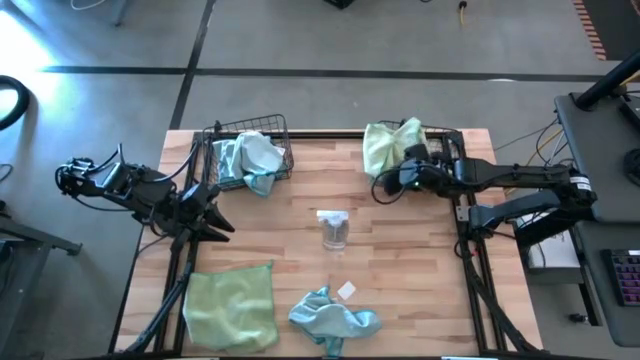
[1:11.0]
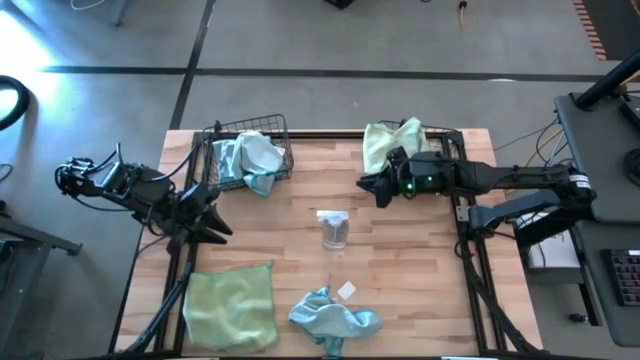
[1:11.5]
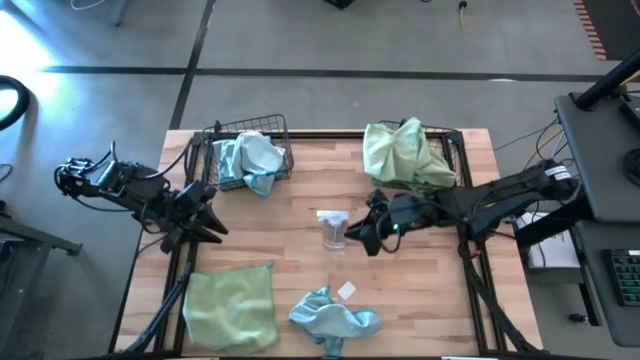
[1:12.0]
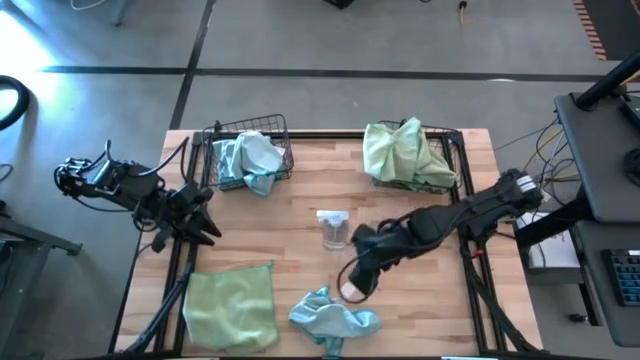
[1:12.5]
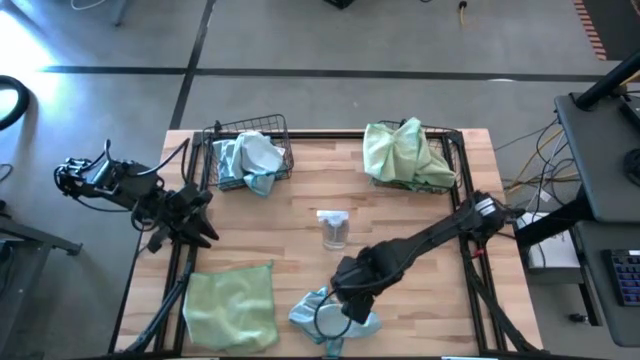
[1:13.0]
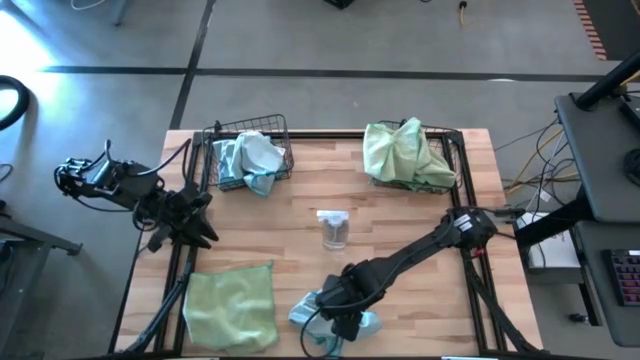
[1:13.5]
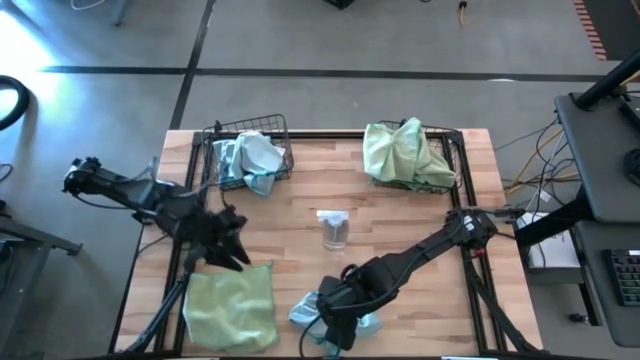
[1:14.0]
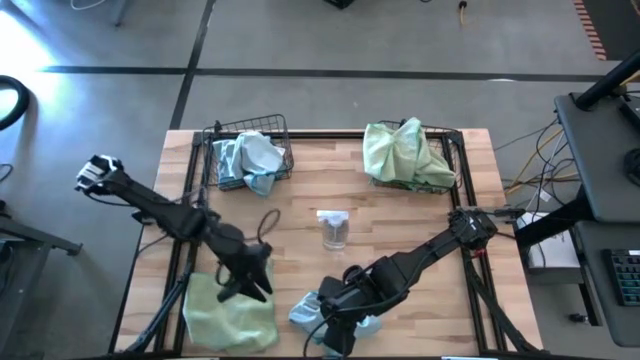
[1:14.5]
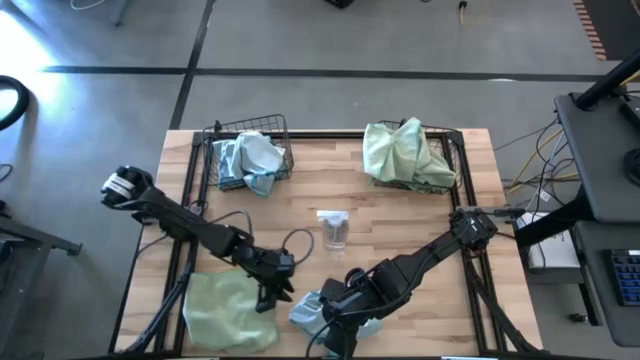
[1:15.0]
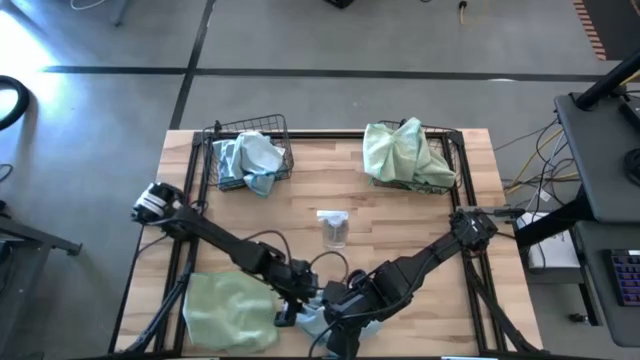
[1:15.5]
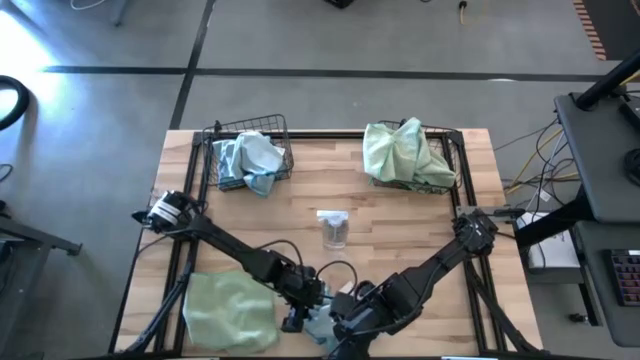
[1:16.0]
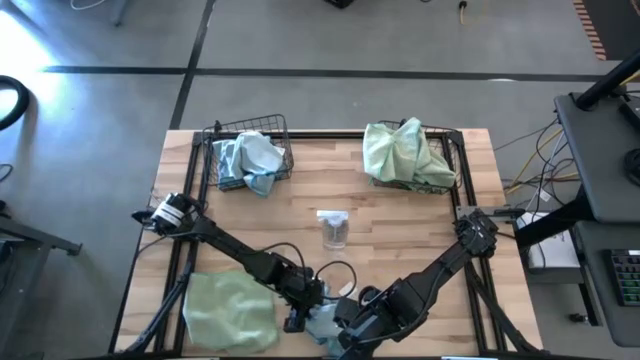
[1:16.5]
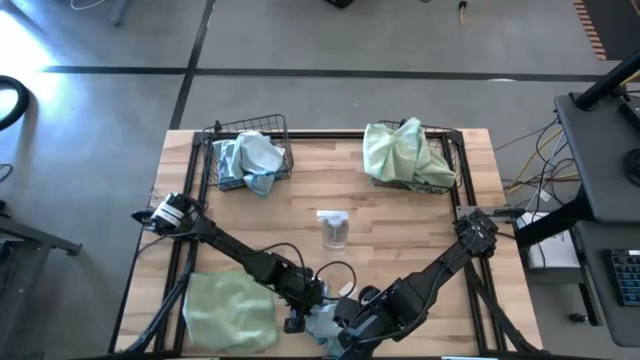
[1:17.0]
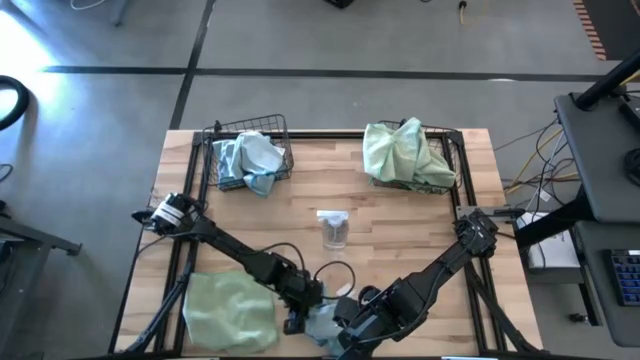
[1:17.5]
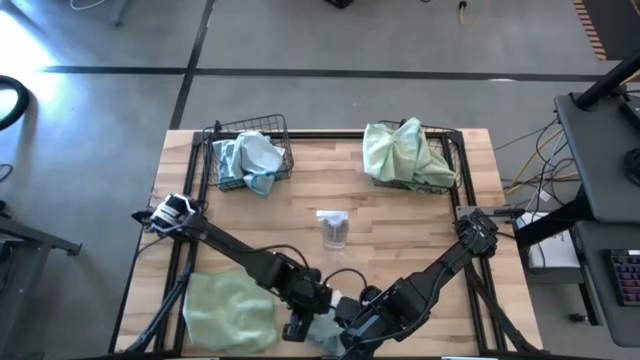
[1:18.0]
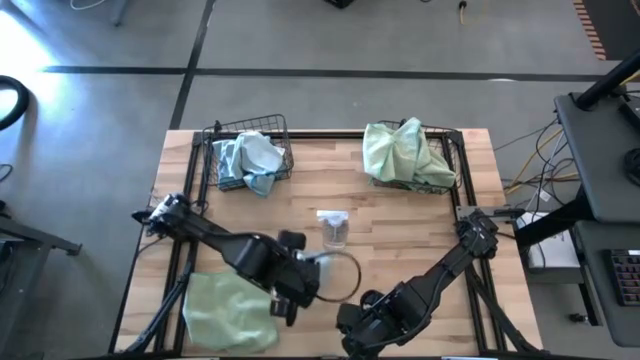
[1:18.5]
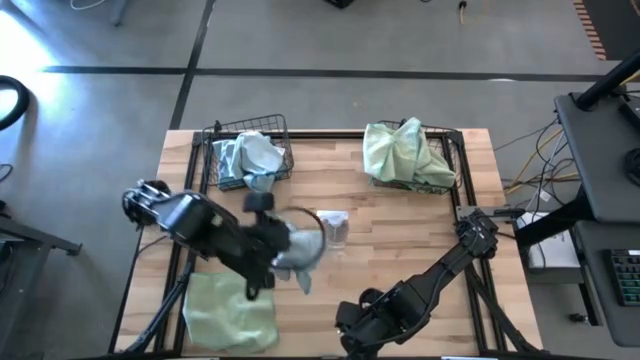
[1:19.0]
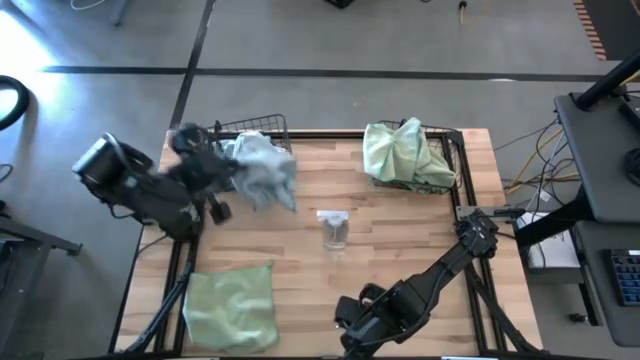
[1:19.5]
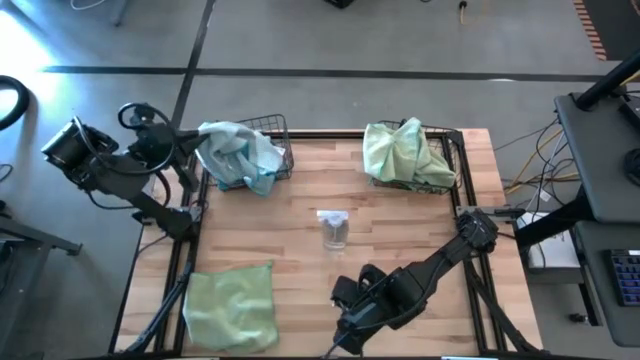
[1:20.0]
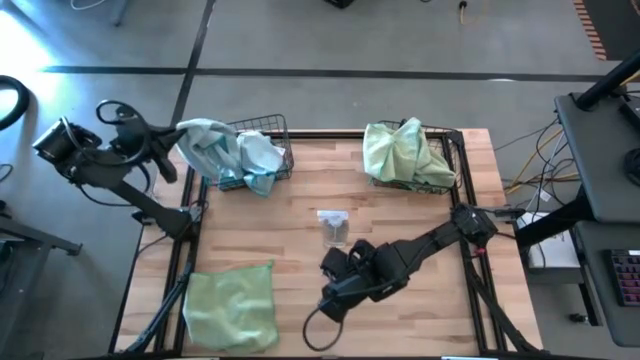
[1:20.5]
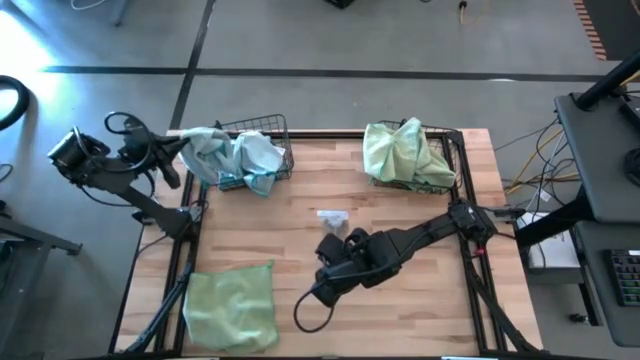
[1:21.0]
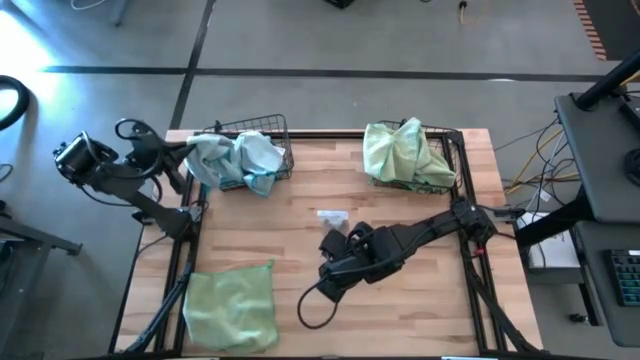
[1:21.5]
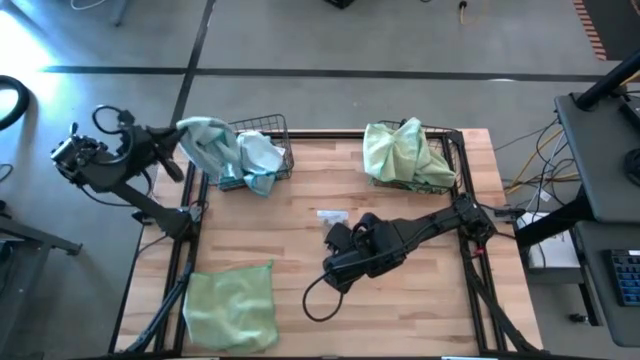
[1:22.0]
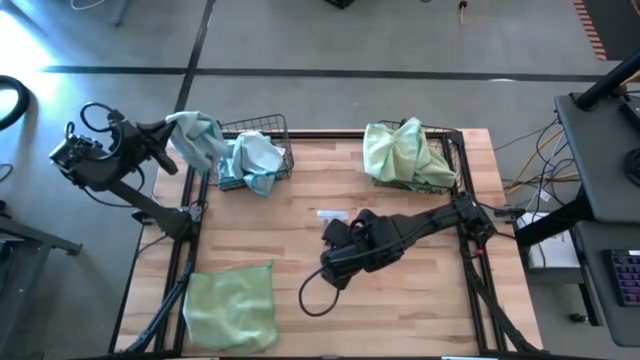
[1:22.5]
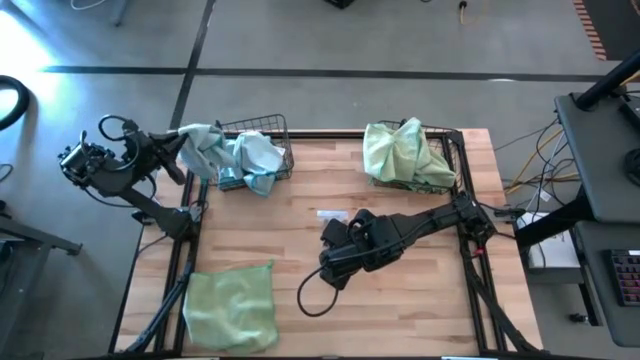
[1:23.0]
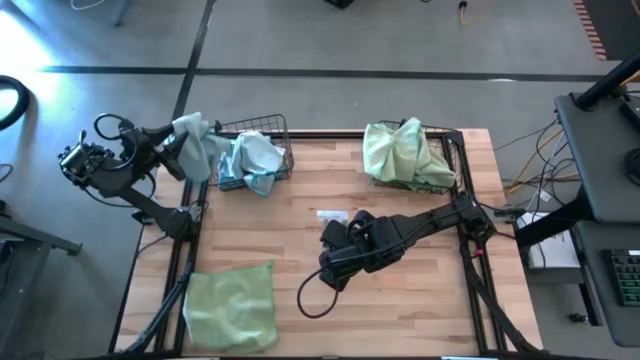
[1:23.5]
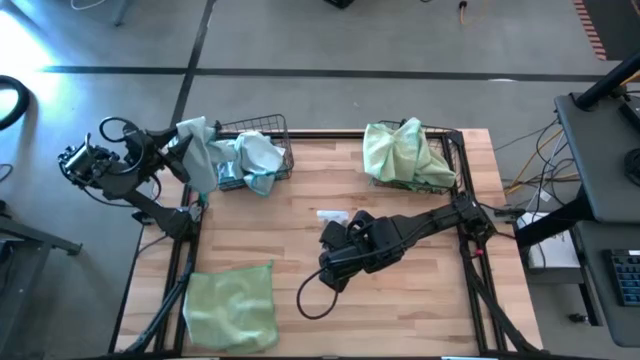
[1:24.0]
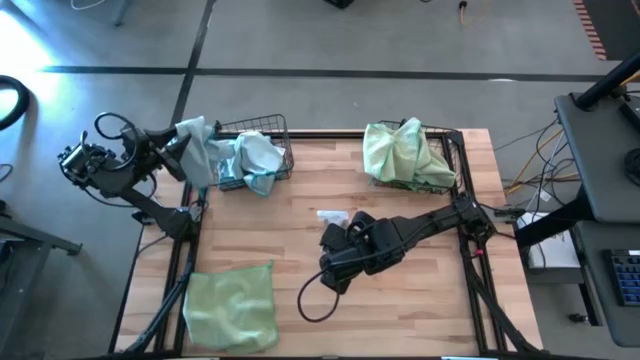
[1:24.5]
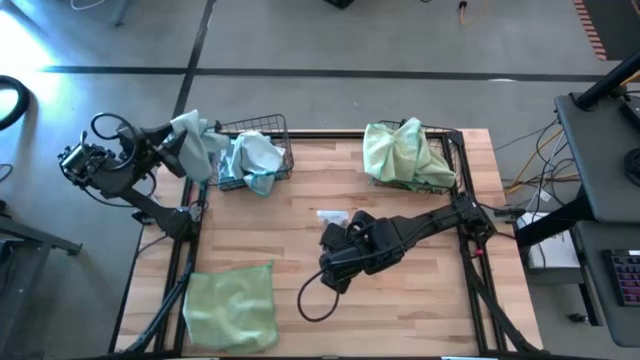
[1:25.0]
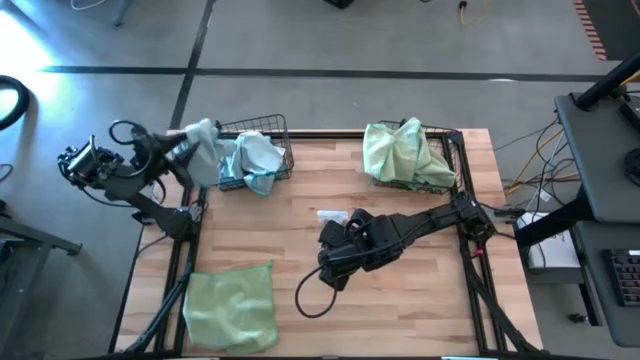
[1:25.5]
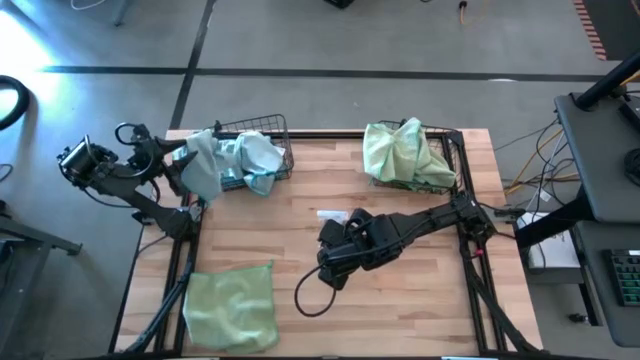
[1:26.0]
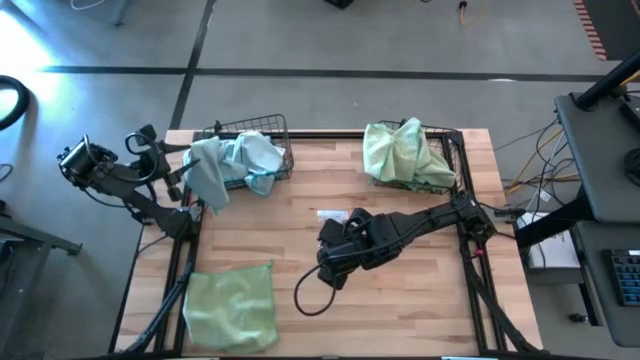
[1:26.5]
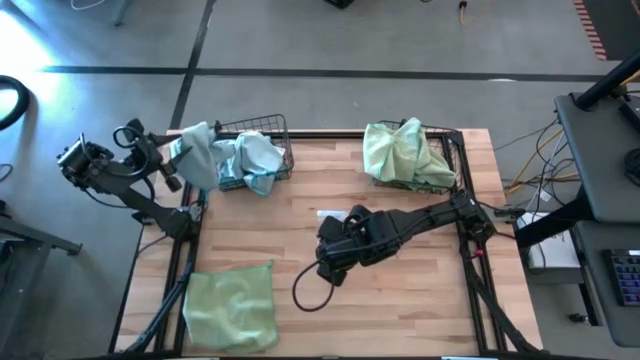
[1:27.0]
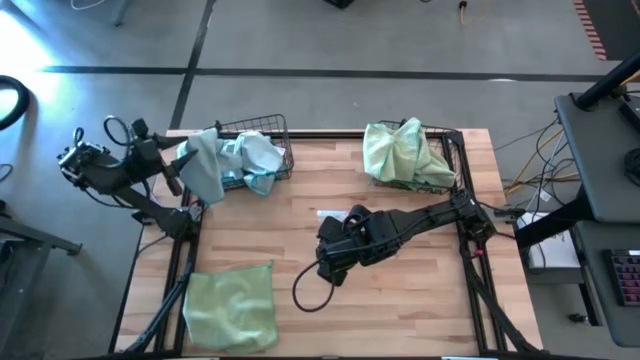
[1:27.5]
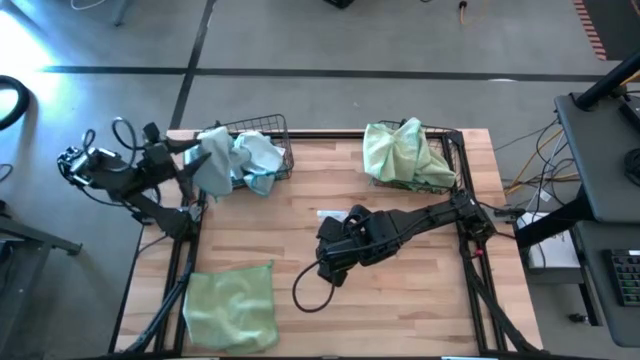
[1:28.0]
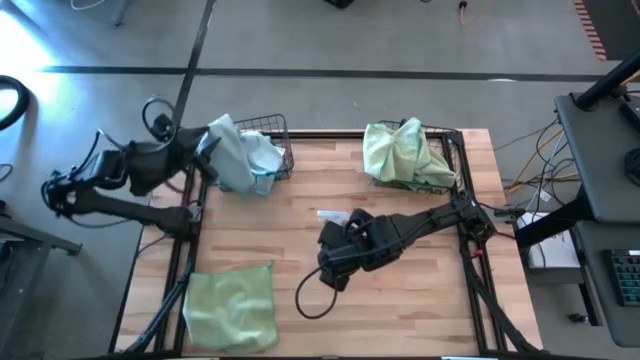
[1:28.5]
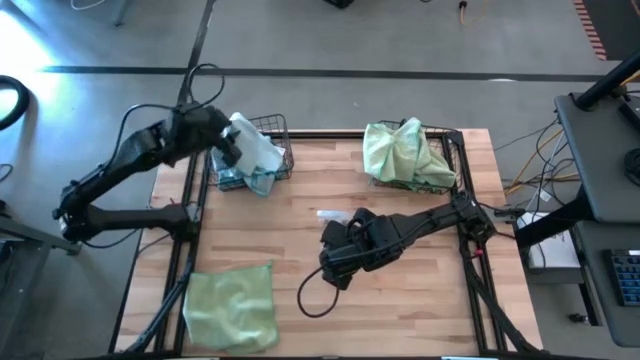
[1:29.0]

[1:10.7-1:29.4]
Task: Sort microfiber towel by color & place in baskets
Put the blue towel into the left wire basket

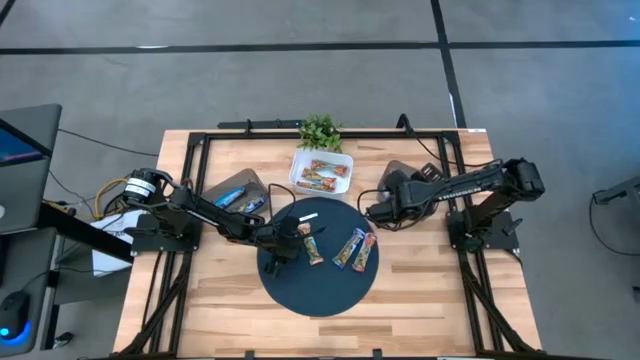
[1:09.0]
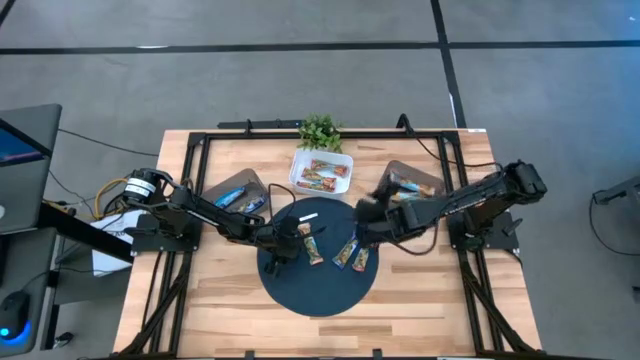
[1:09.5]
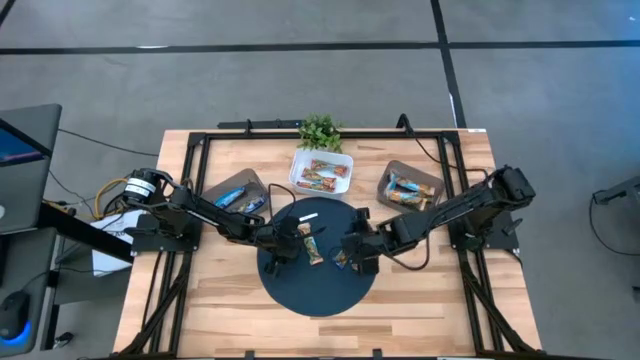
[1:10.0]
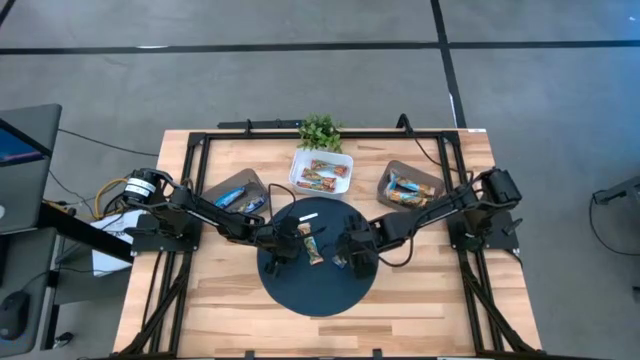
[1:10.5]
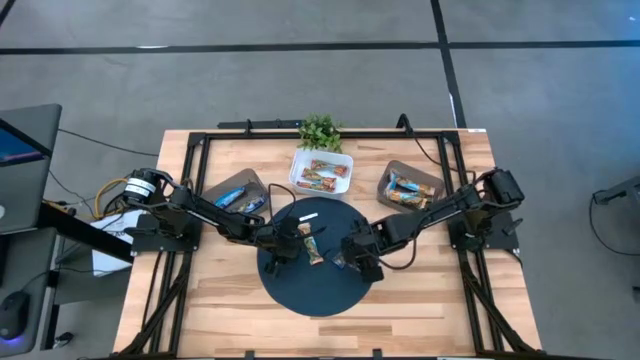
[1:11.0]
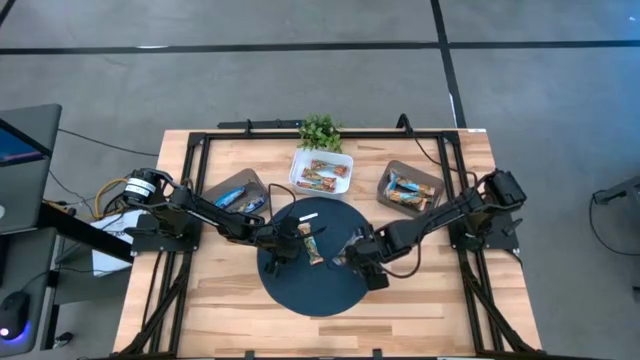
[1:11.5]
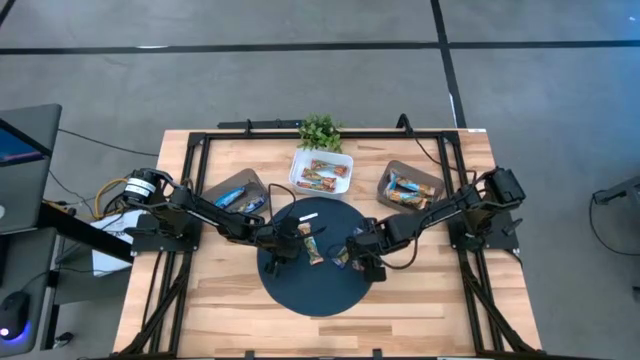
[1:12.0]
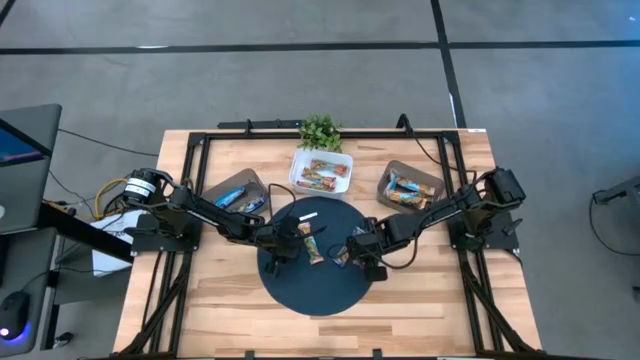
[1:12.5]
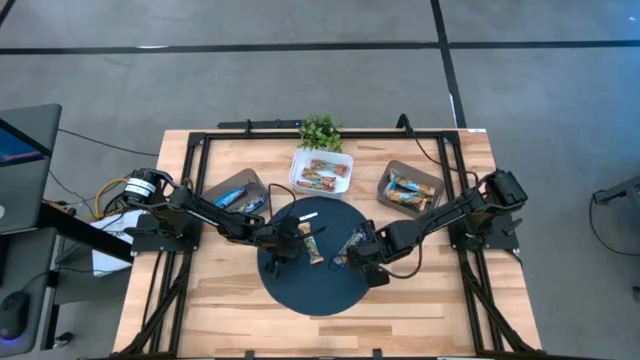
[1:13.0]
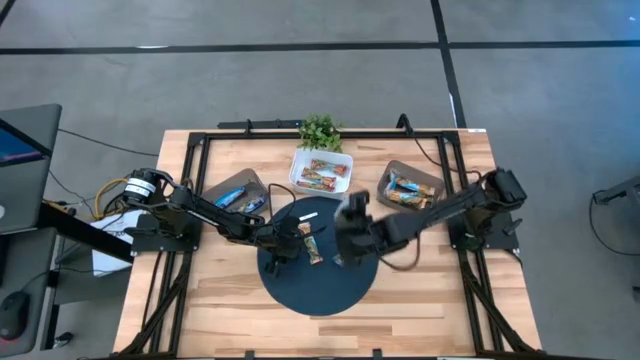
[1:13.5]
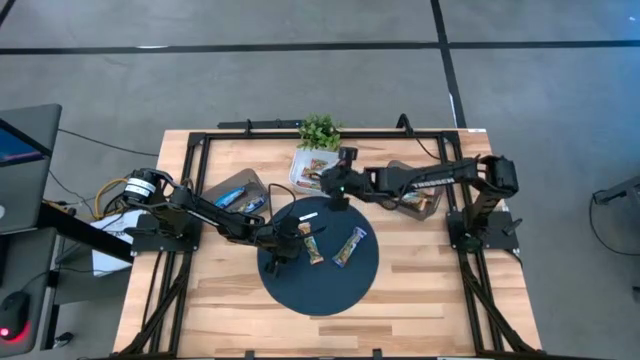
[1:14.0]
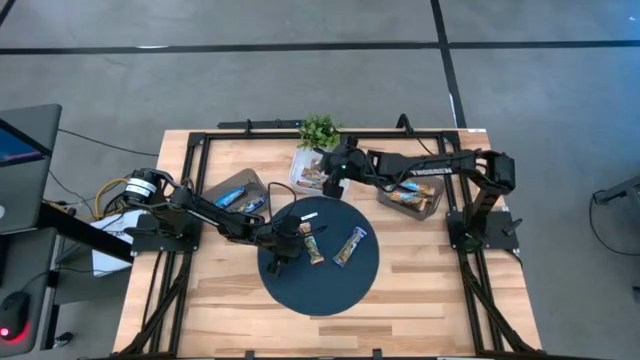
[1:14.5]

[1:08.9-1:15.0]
Task: Pick and place Granola Bars by type
Put the red granola bar into the white bin
